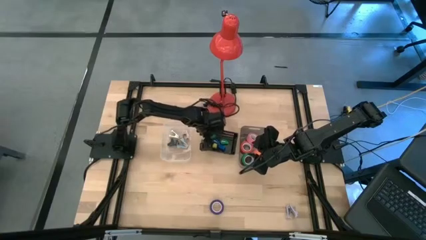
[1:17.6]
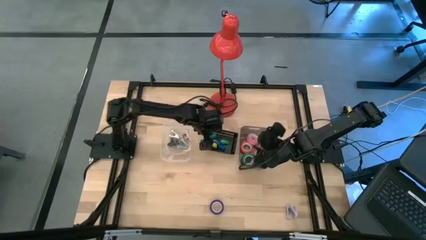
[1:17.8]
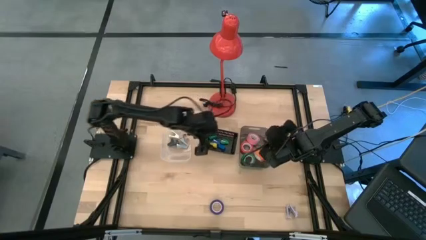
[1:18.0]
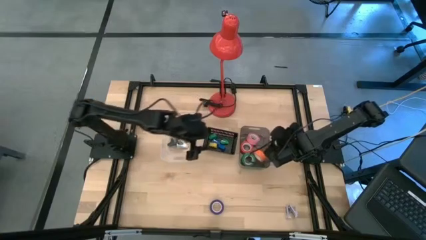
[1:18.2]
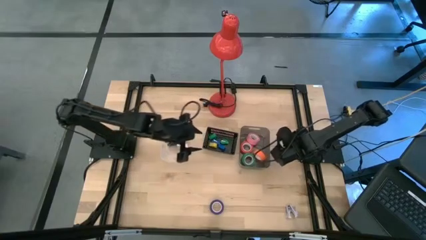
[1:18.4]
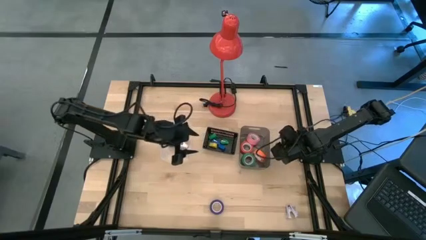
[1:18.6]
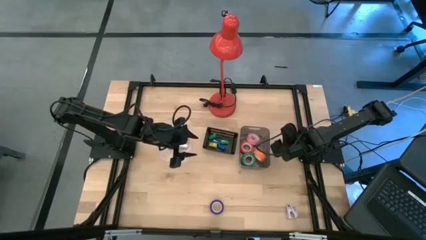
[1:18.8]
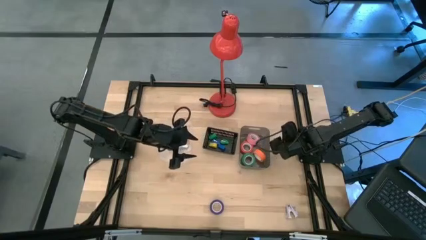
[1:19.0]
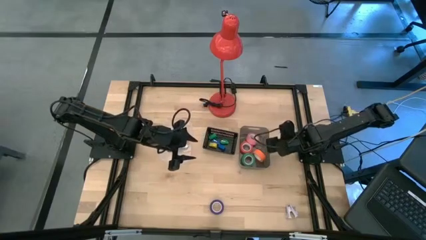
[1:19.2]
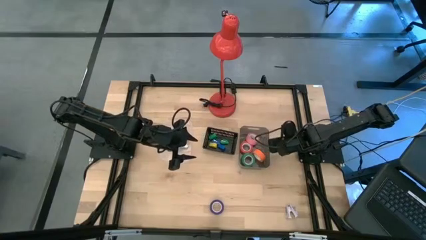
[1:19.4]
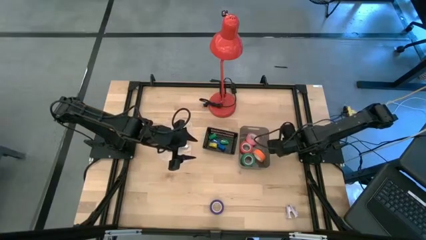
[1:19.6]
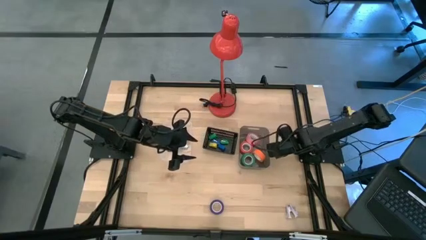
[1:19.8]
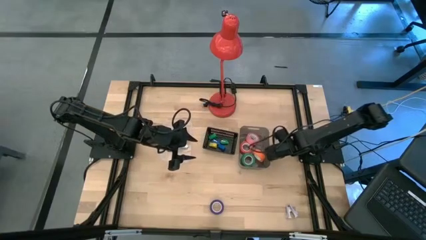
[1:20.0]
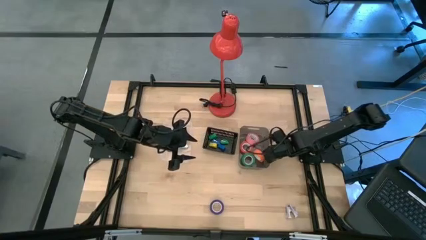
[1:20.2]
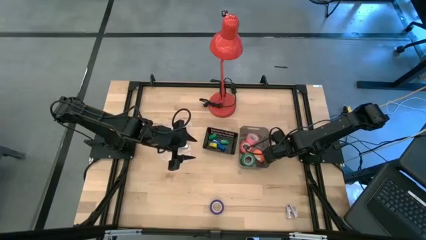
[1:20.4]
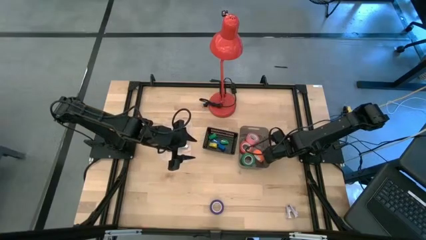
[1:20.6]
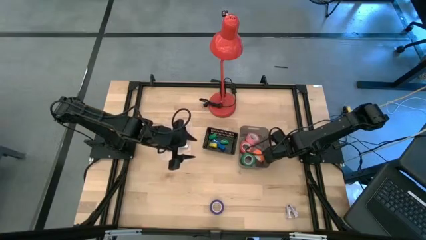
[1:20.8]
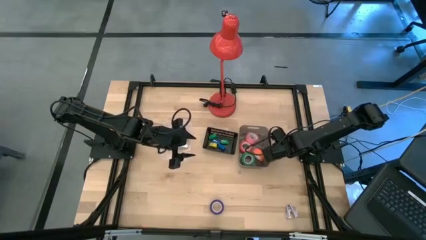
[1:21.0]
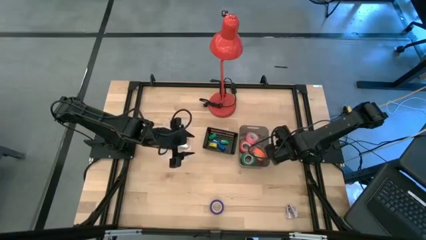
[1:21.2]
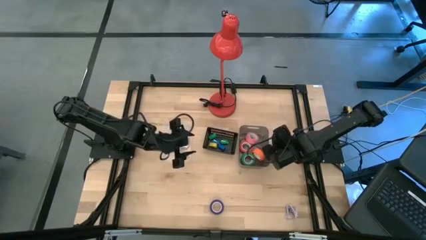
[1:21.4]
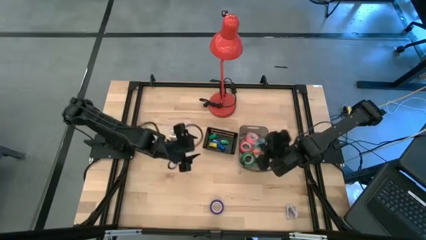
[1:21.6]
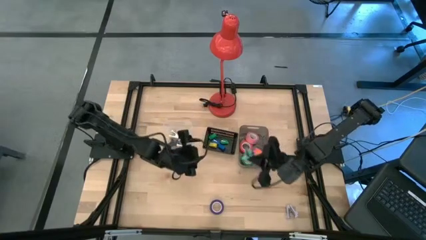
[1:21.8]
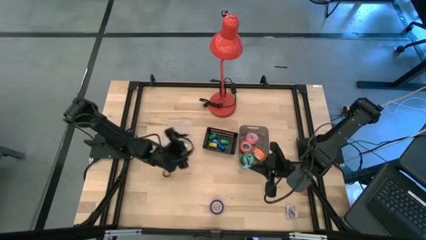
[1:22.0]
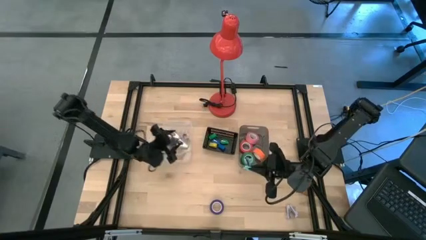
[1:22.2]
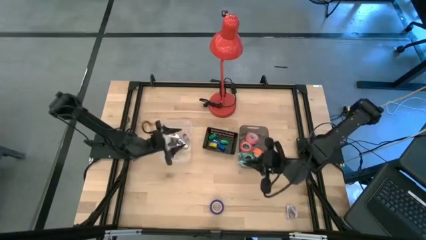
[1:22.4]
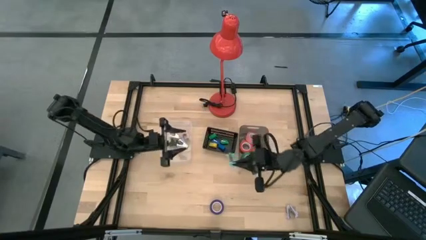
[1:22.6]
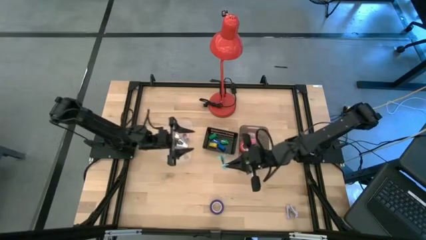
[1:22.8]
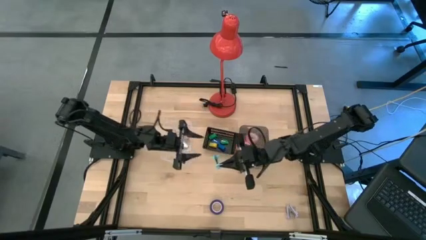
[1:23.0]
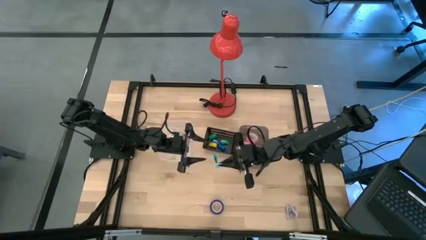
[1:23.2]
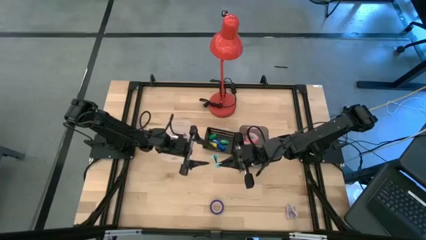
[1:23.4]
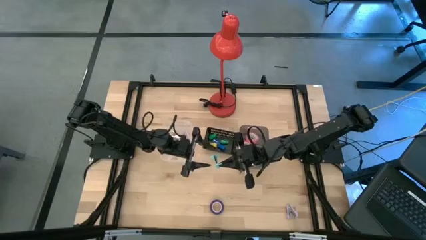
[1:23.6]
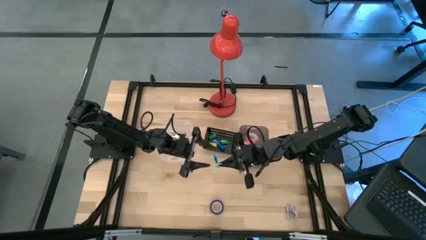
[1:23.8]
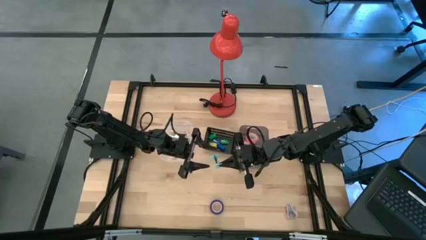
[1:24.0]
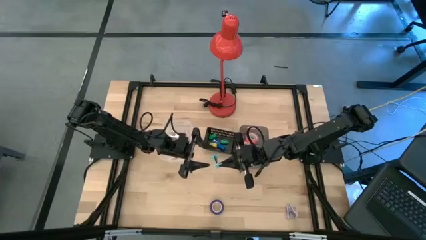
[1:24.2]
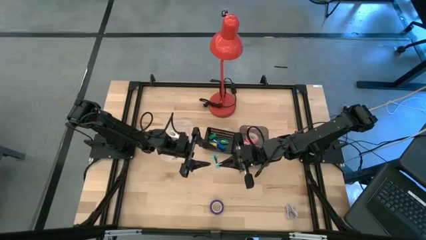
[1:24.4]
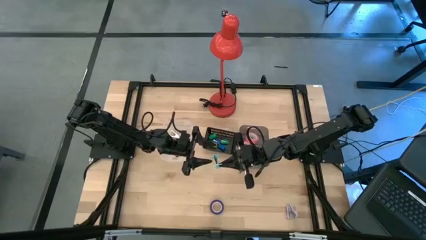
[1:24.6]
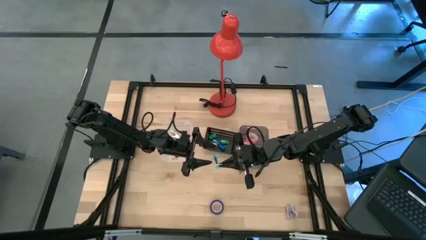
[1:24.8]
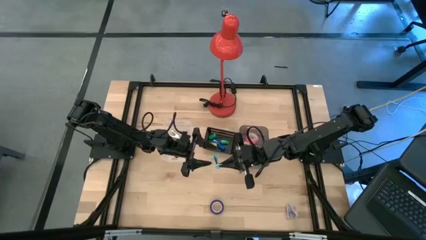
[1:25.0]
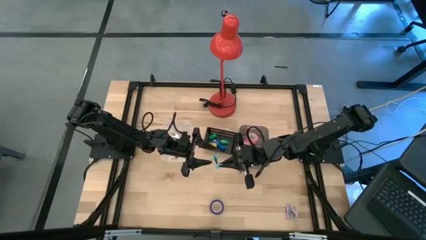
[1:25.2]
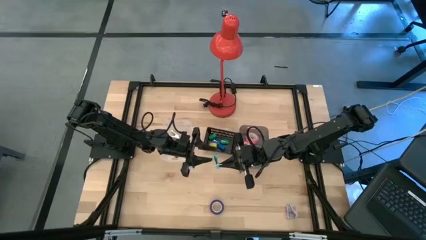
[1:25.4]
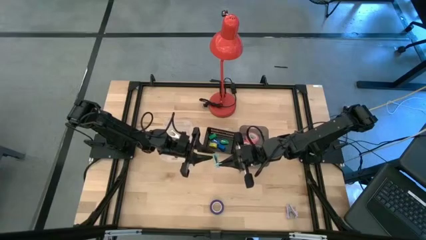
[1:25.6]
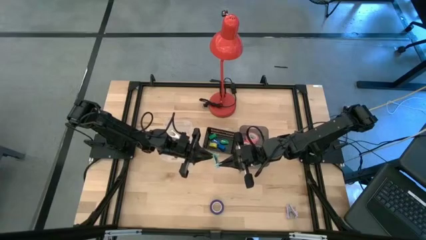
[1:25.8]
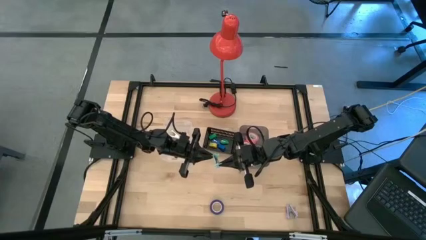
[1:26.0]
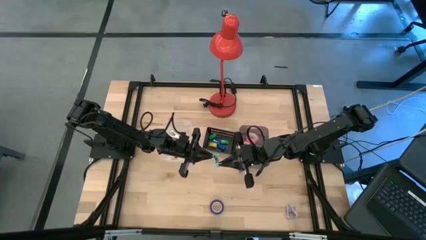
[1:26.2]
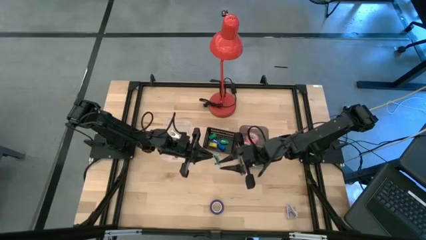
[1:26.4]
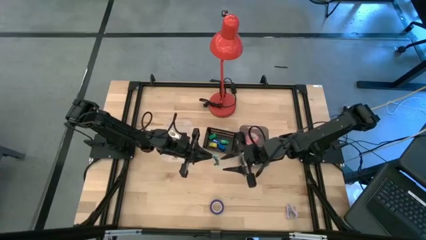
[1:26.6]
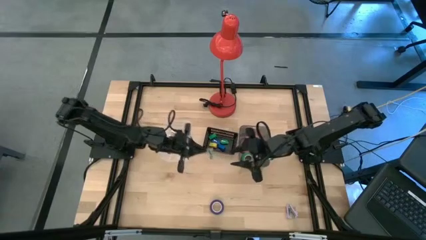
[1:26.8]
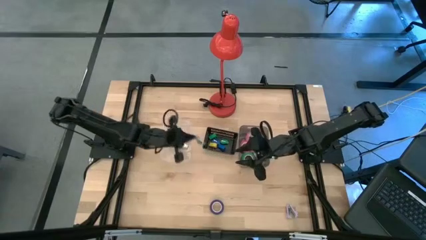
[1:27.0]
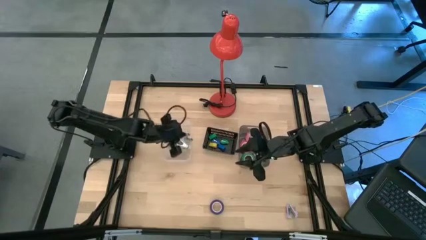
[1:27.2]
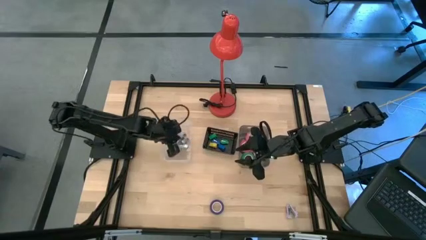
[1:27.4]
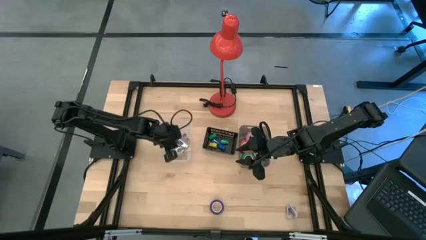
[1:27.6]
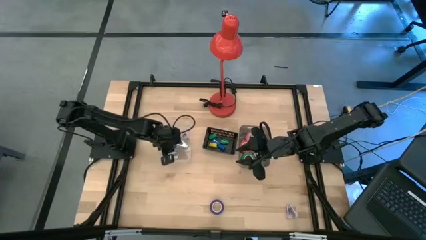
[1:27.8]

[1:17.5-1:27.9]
Task: Pick and place Stapler, Stapler remover, tape
Put the blue staple remover into the transparent bin

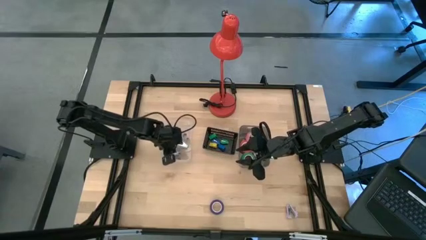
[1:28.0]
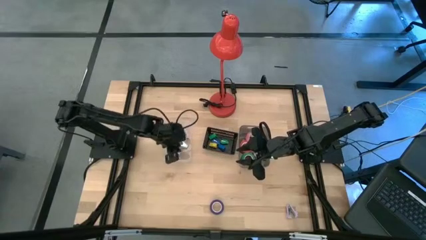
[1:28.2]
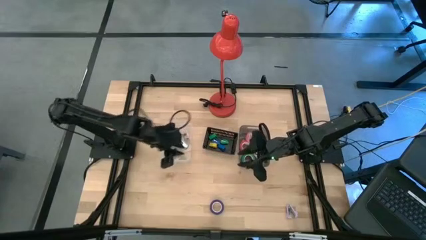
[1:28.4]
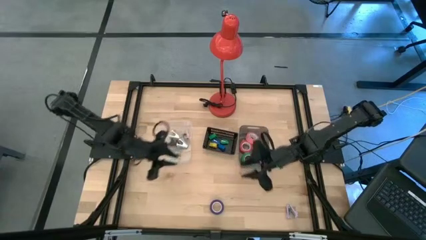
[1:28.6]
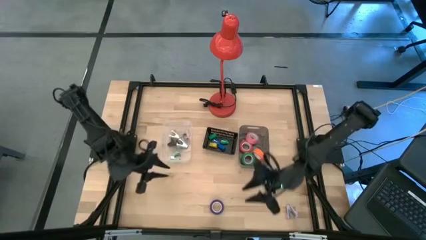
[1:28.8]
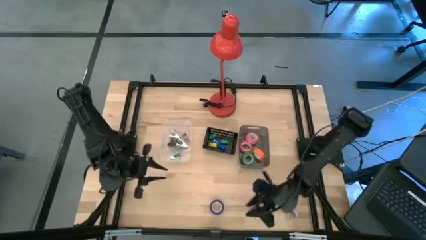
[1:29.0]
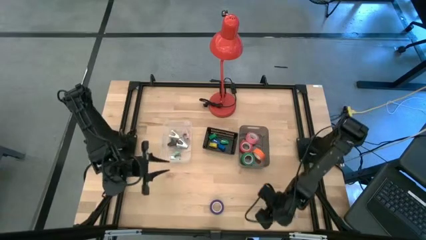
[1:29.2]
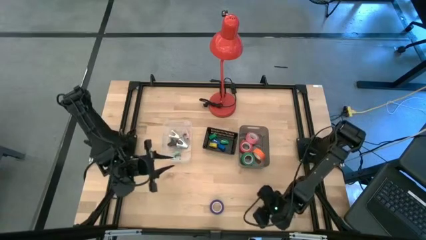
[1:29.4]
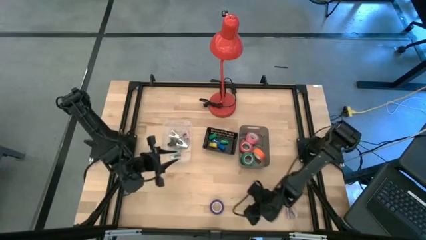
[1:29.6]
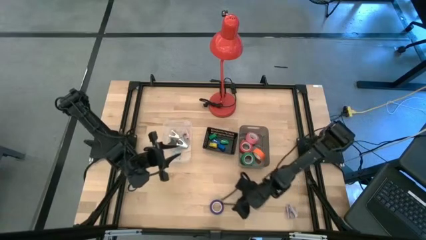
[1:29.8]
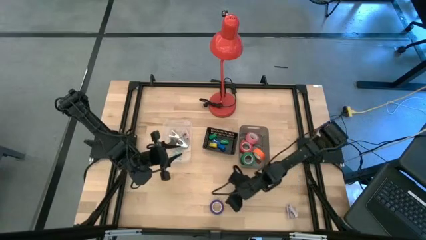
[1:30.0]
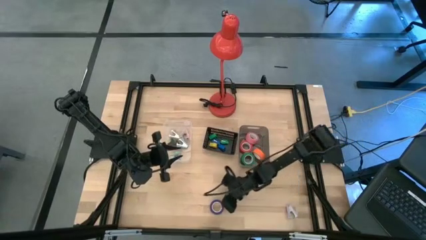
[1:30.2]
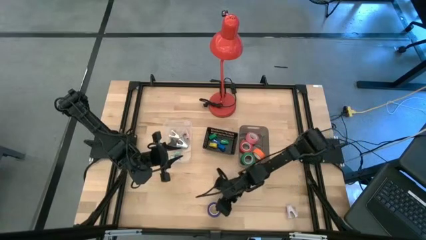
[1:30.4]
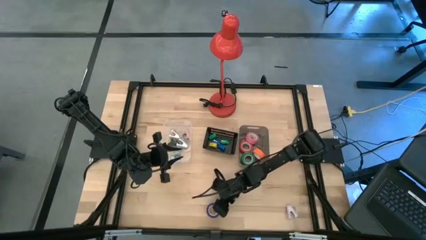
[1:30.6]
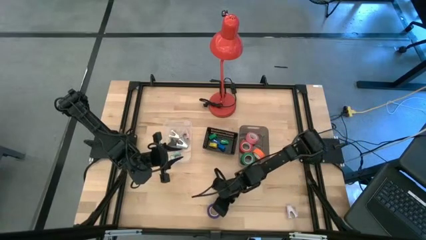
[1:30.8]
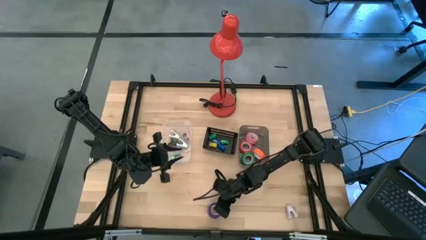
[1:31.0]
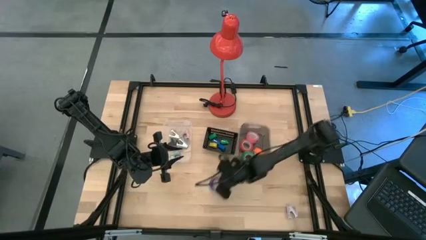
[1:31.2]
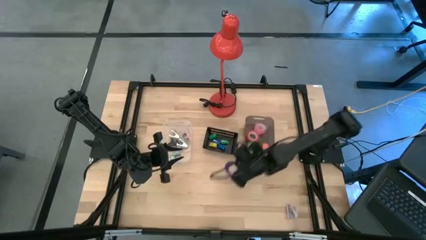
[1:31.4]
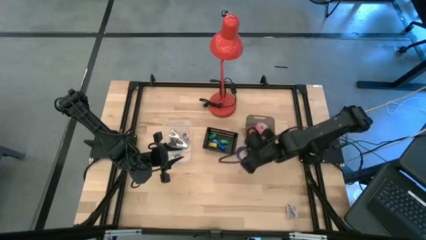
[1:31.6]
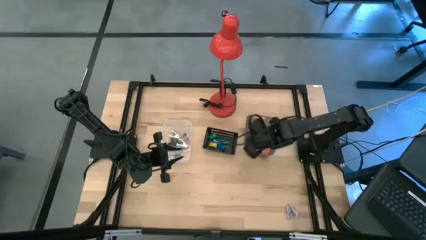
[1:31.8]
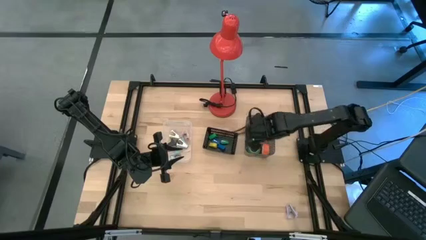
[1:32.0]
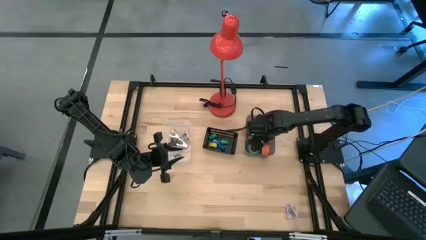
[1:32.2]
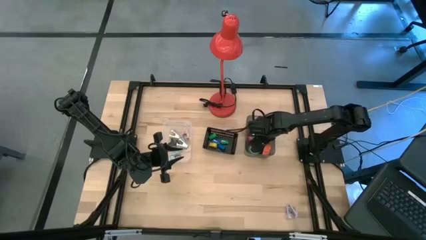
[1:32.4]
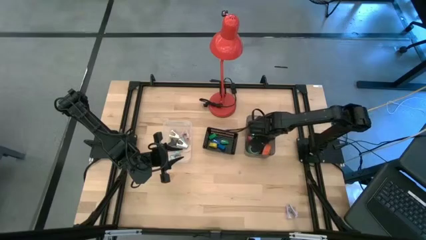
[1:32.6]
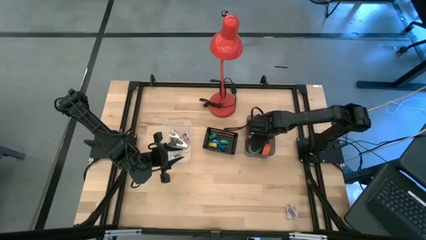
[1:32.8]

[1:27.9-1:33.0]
Put the blue tape into the black bin

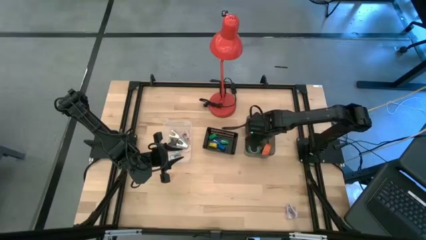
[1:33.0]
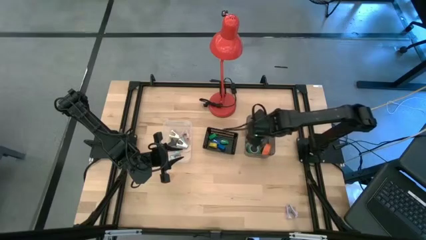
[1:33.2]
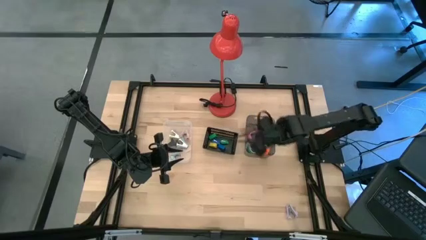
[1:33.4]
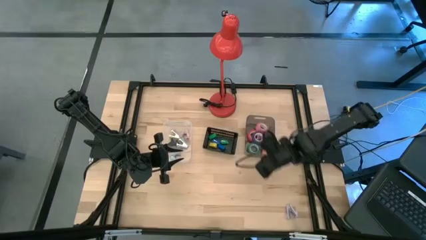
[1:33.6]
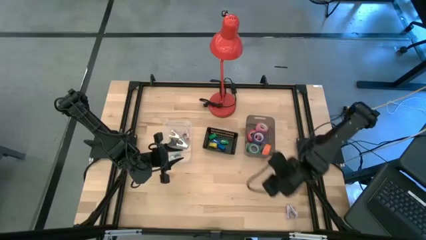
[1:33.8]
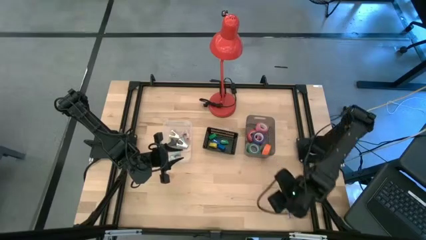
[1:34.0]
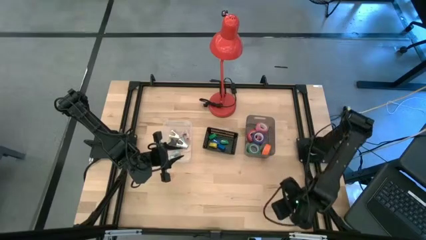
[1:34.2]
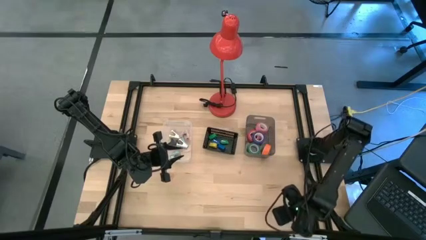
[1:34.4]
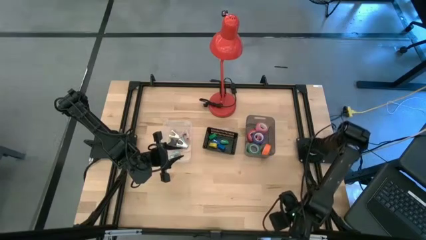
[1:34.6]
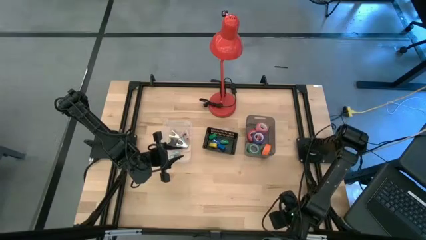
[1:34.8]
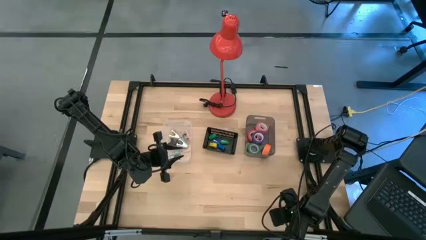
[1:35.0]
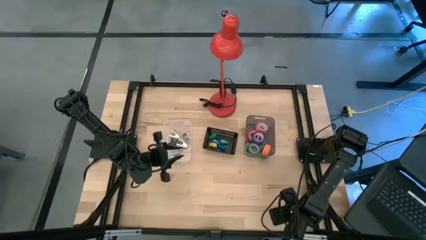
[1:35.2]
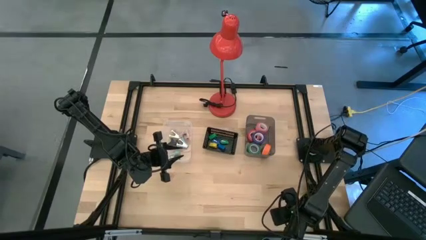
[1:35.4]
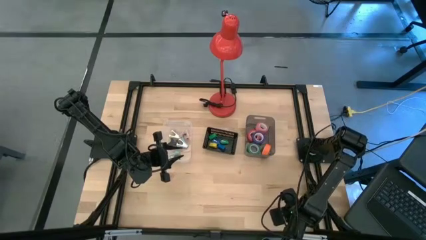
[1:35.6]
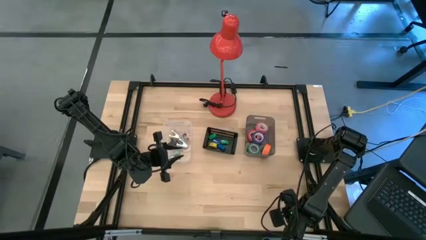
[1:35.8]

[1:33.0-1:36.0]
Put the purple staple remover into the transparent bin
